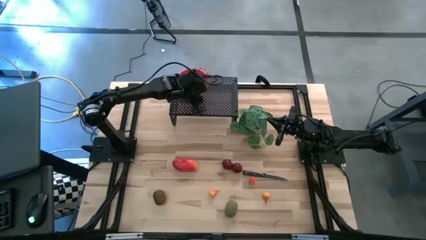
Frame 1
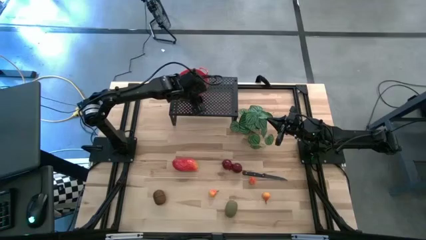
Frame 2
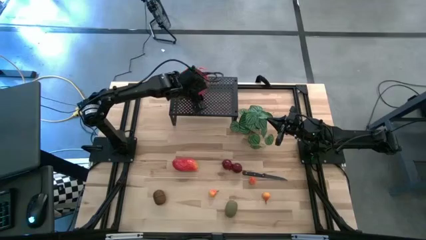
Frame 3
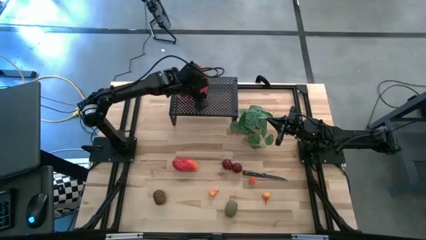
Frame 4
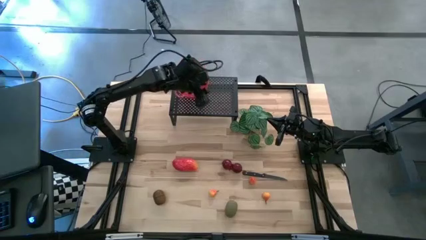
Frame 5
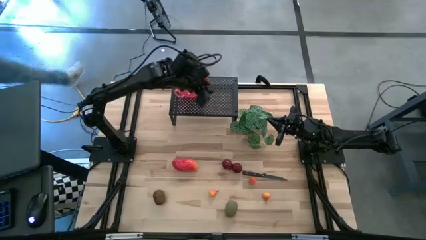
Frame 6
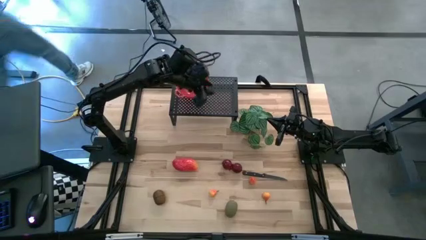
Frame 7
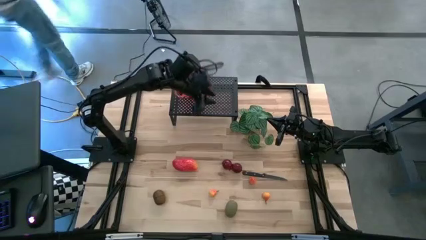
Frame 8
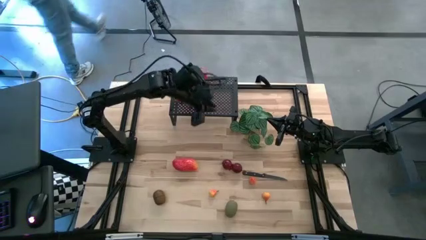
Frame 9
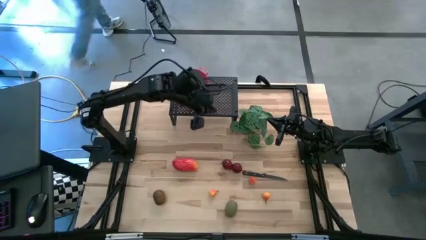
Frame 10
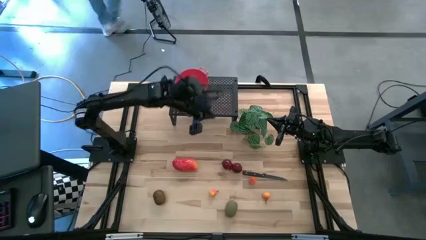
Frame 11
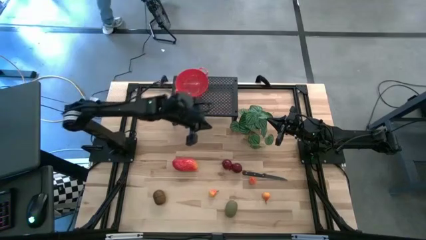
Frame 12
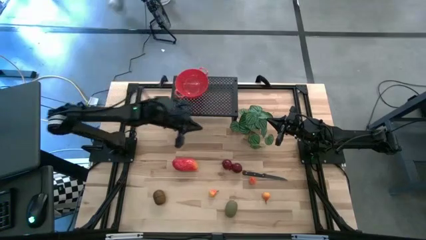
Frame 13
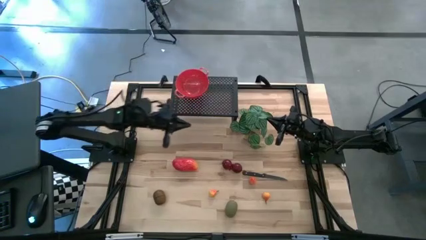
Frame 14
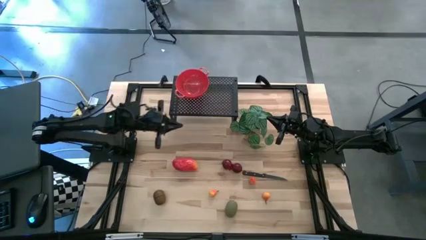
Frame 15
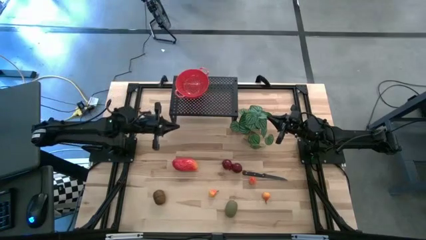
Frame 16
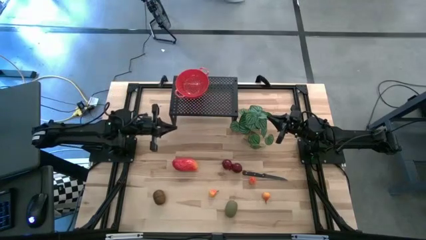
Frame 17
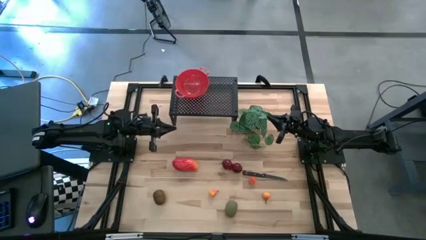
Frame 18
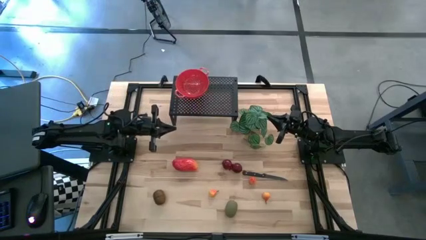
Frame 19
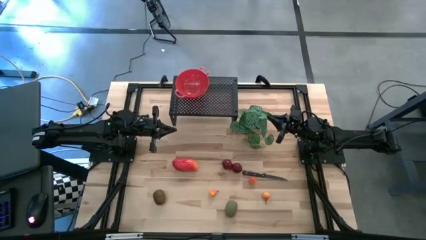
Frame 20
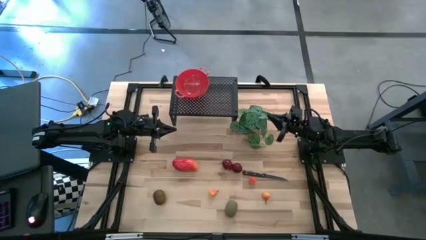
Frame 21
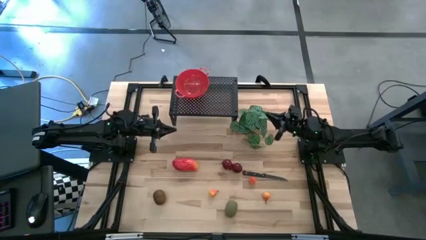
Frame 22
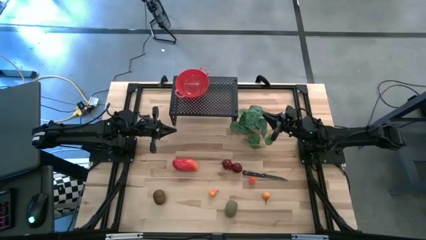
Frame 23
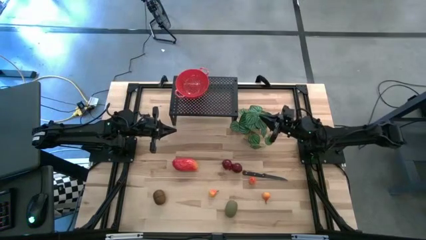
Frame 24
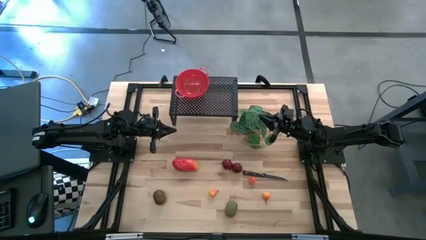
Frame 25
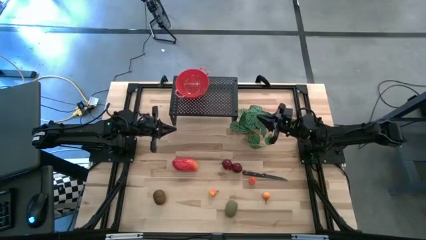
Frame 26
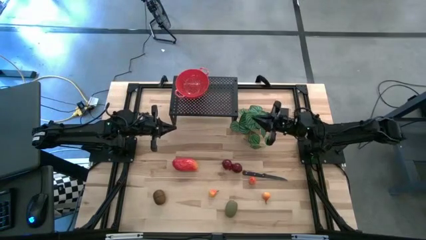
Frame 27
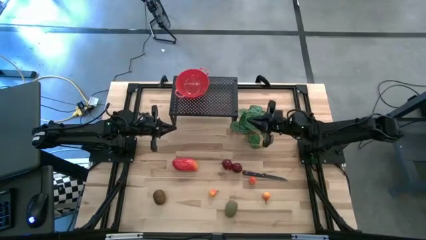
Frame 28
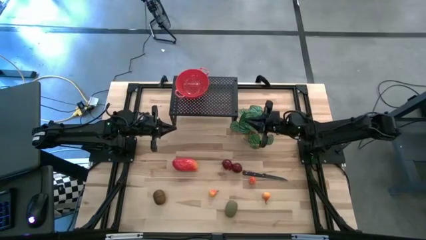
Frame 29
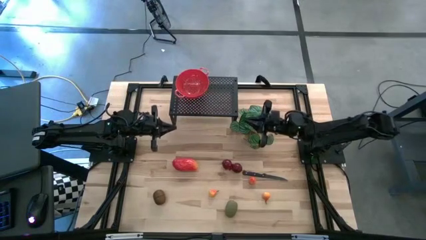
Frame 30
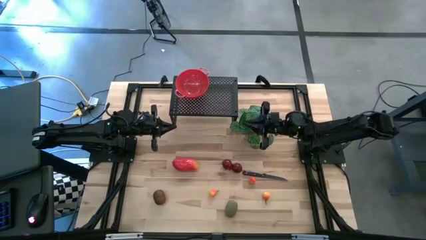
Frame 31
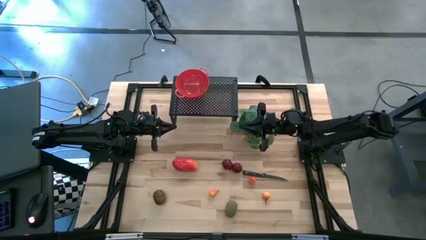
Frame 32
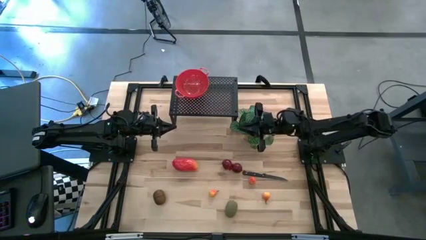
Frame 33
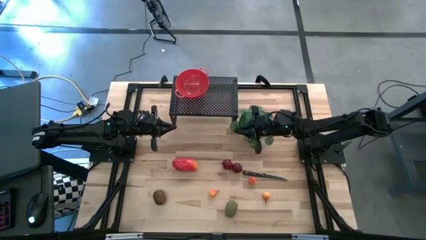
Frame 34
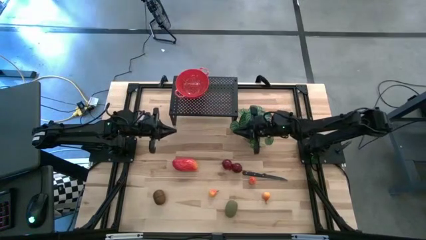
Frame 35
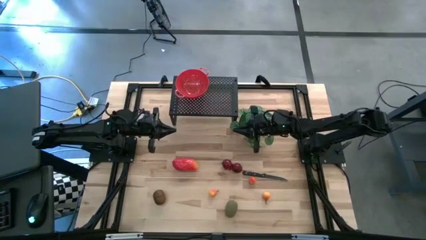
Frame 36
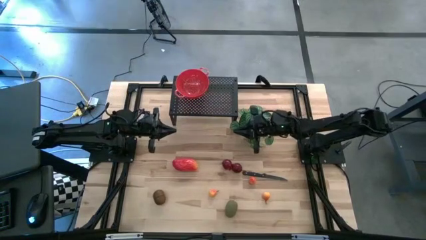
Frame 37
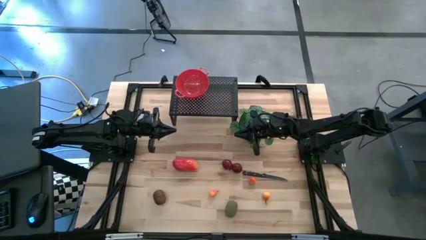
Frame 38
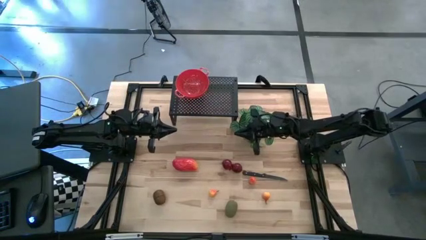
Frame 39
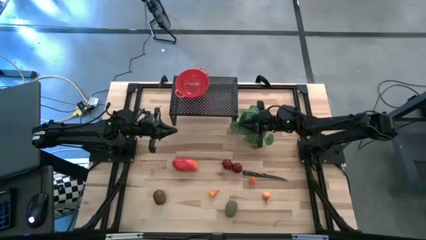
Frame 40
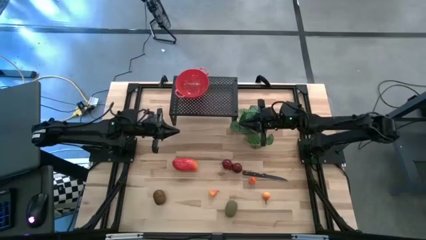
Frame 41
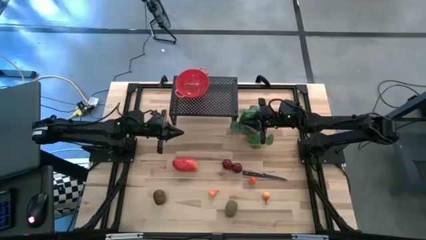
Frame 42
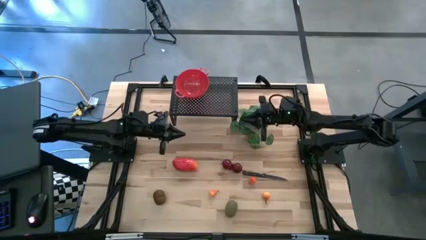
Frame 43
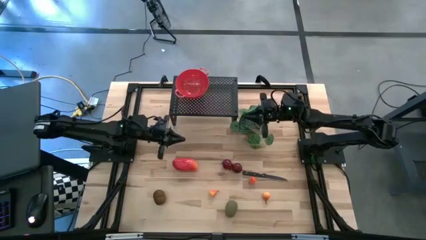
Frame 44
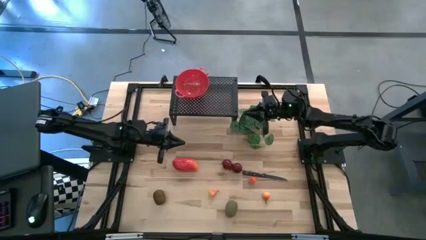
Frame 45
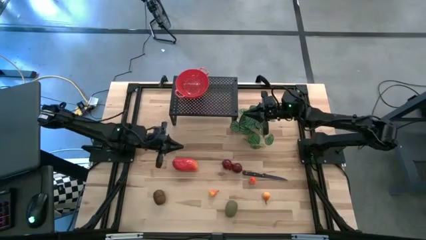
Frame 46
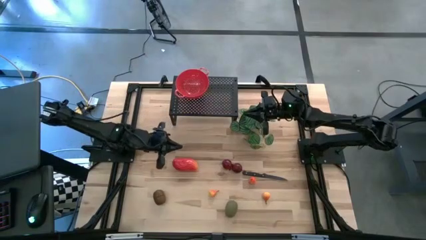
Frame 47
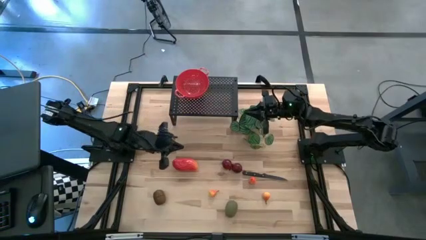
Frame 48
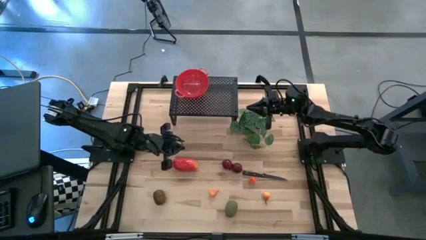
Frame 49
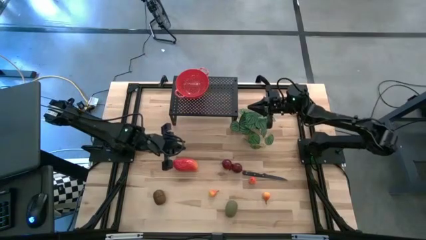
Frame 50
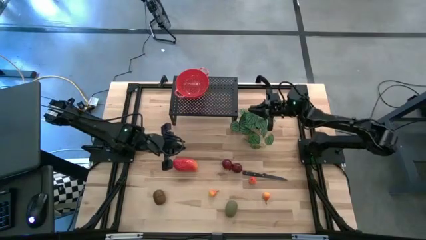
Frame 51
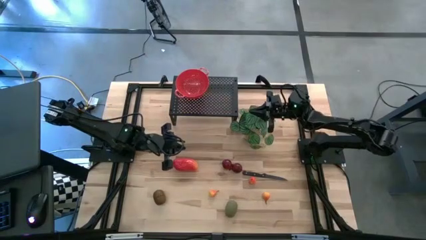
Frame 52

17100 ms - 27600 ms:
Task: Pick & Place Fruit
Put the red mango in the red strainer bowl on the shelf
